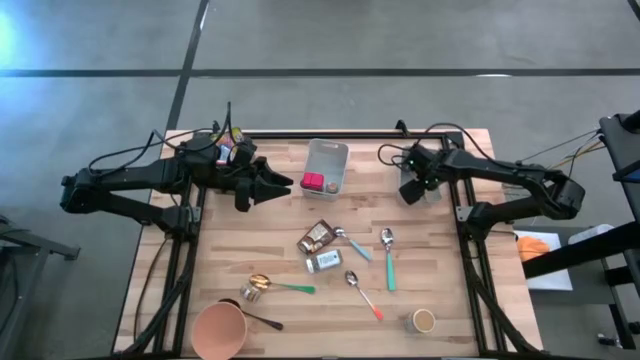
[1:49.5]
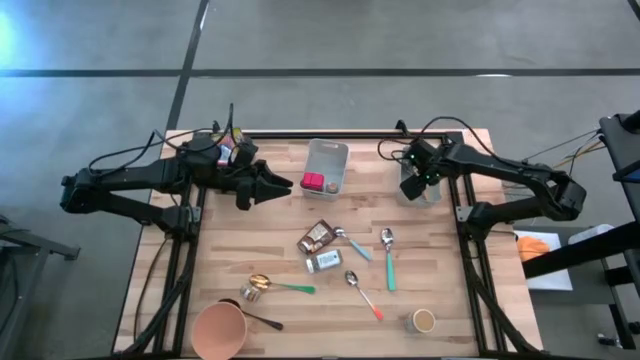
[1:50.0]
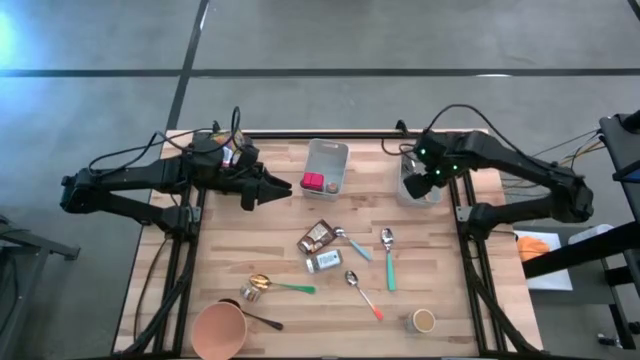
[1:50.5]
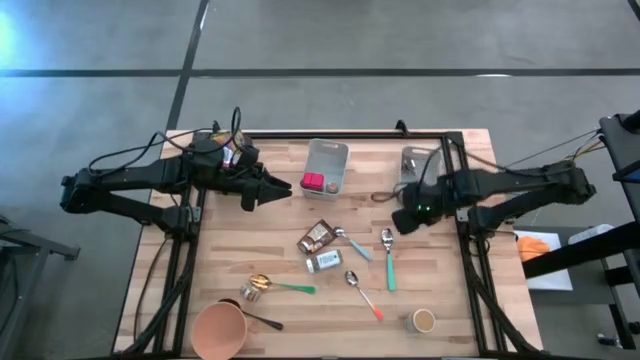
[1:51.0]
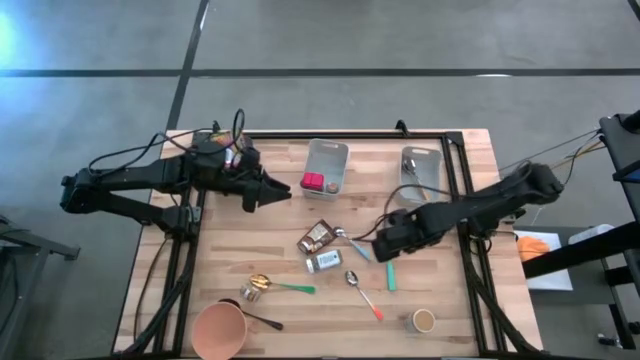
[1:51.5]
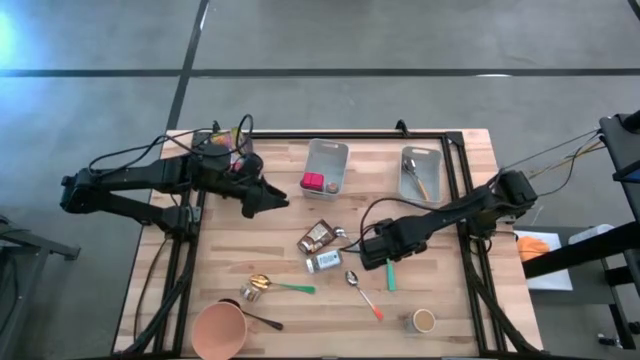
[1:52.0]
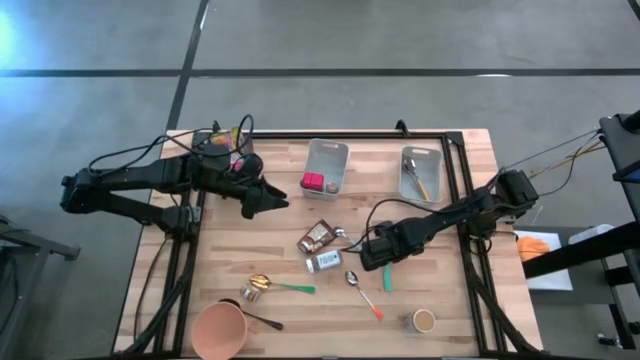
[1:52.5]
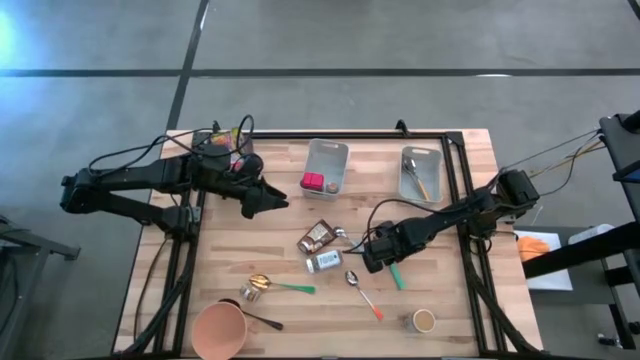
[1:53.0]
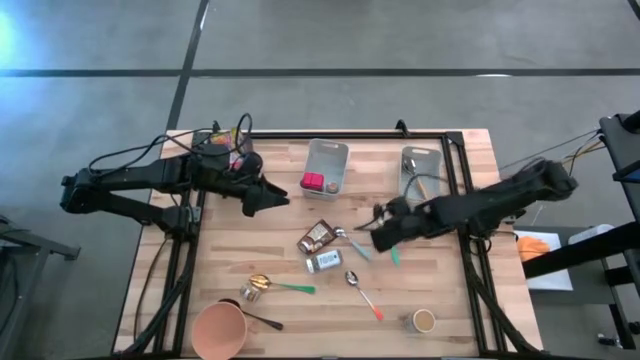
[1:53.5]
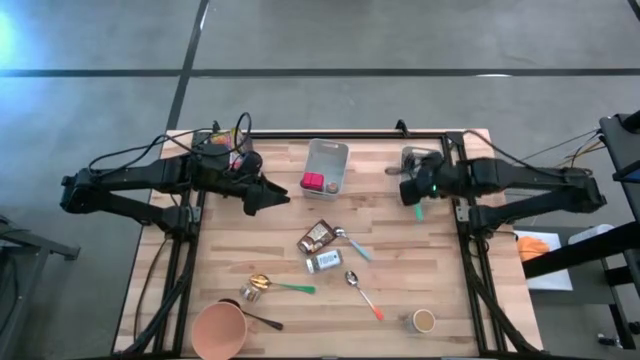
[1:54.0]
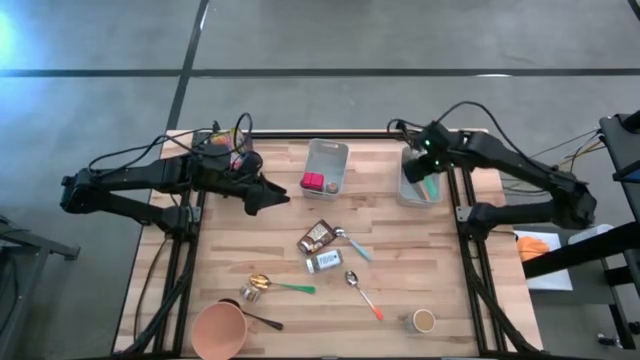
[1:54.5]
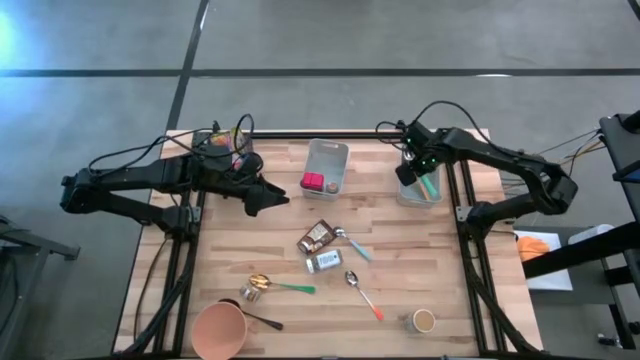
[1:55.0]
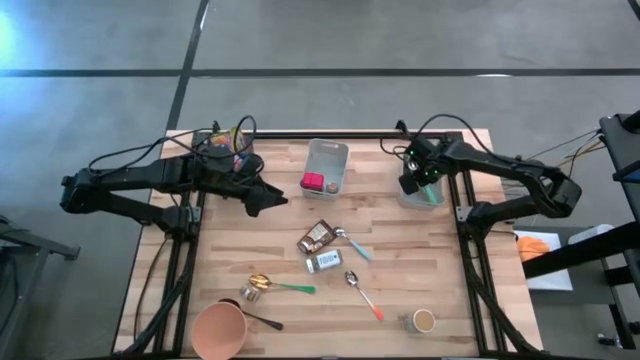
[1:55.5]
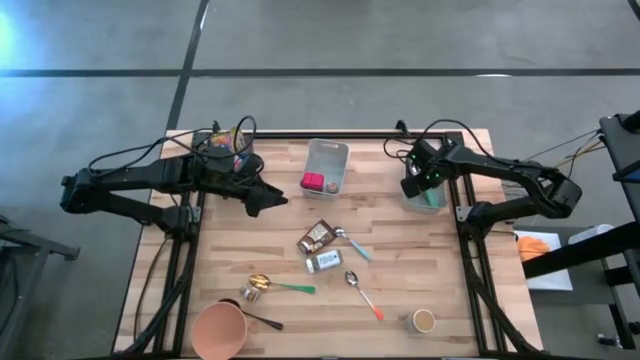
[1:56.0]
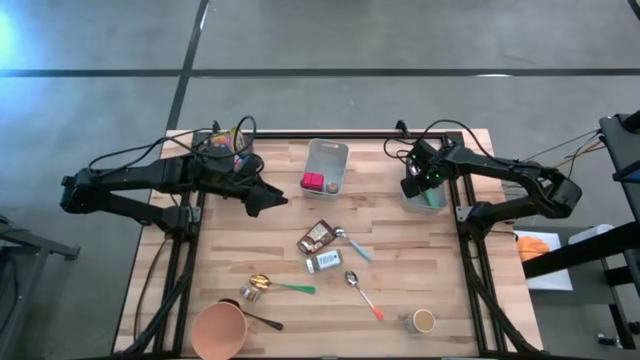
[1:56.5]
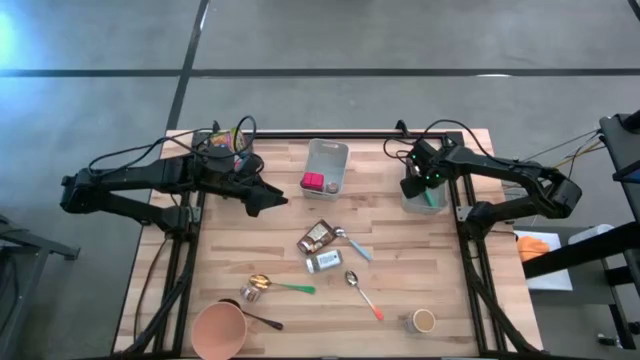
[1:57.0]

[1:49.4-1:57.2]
Put the light green spoon into the right gray bin

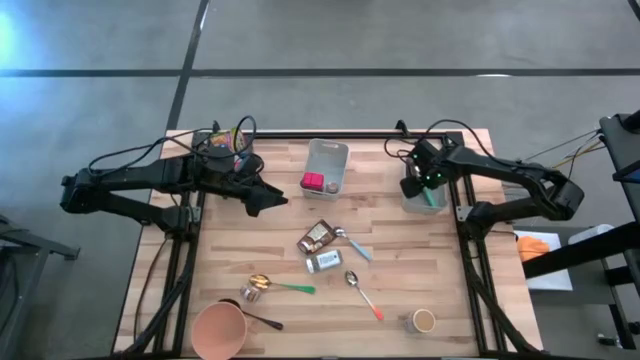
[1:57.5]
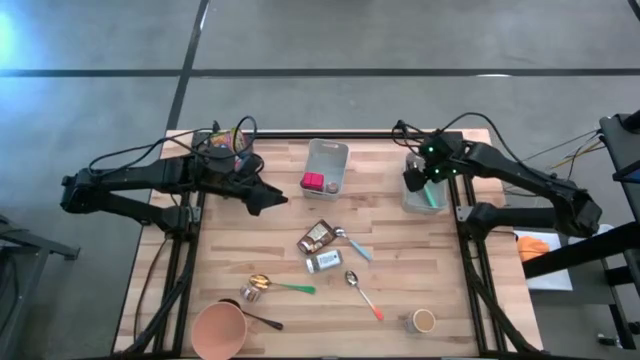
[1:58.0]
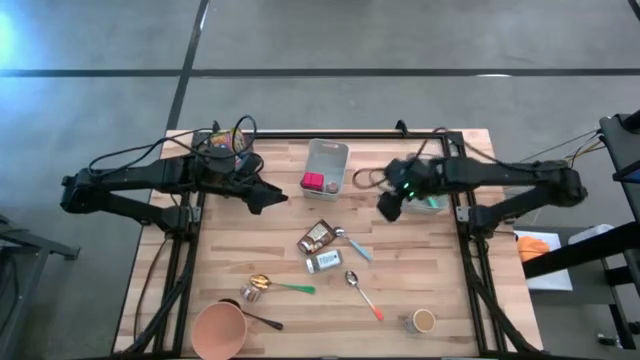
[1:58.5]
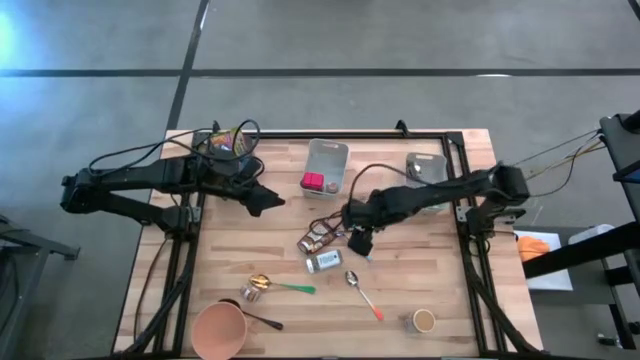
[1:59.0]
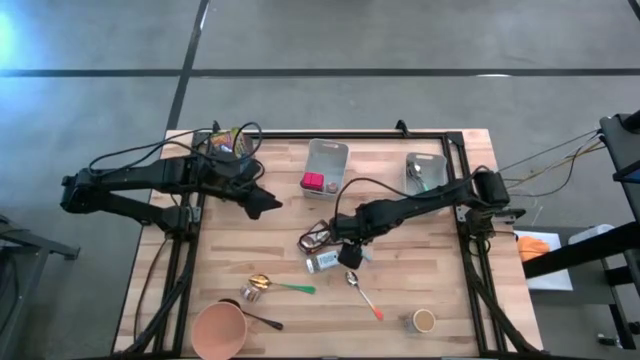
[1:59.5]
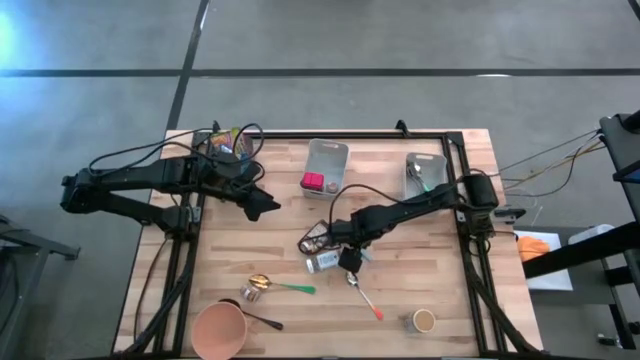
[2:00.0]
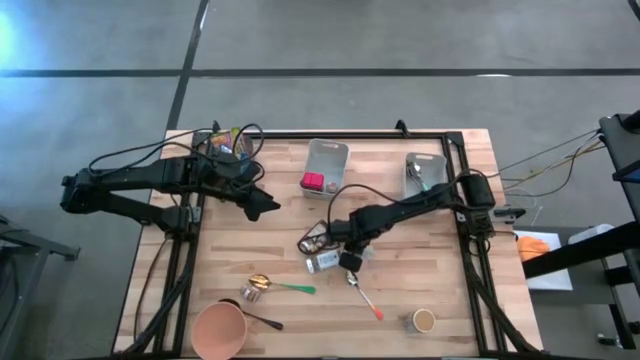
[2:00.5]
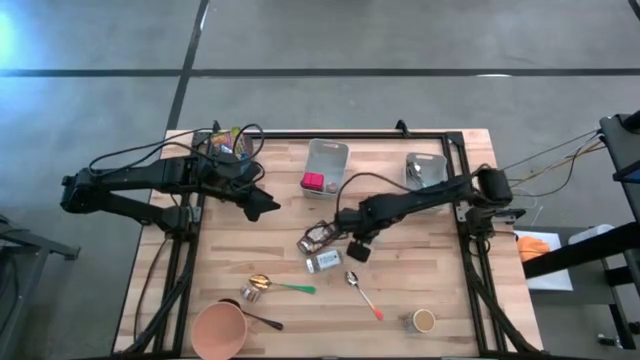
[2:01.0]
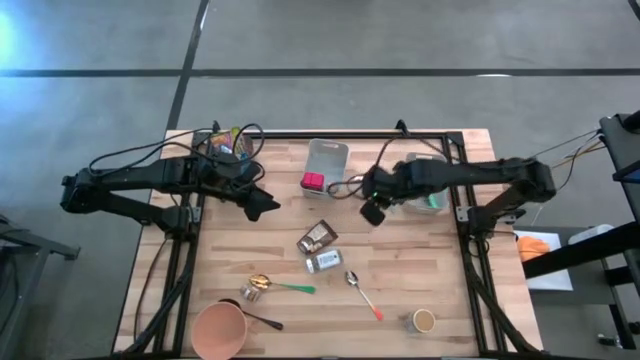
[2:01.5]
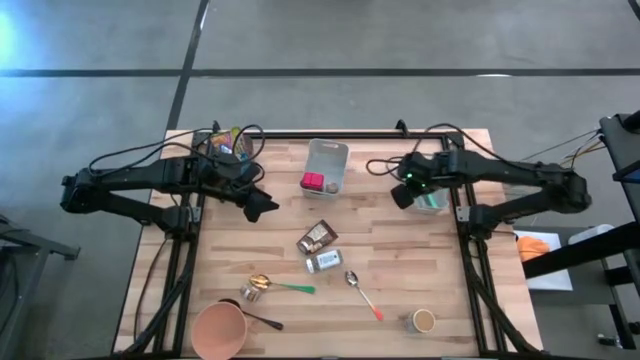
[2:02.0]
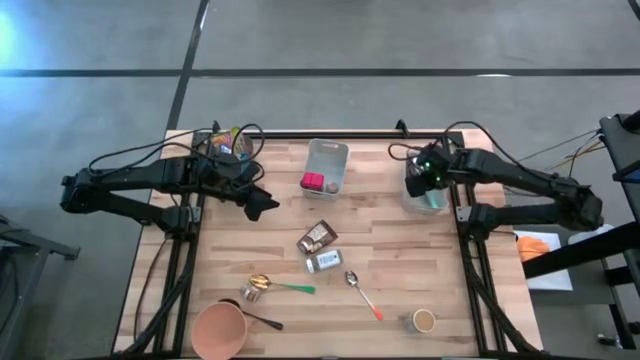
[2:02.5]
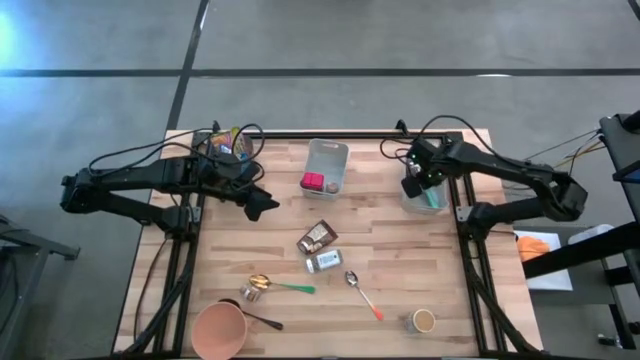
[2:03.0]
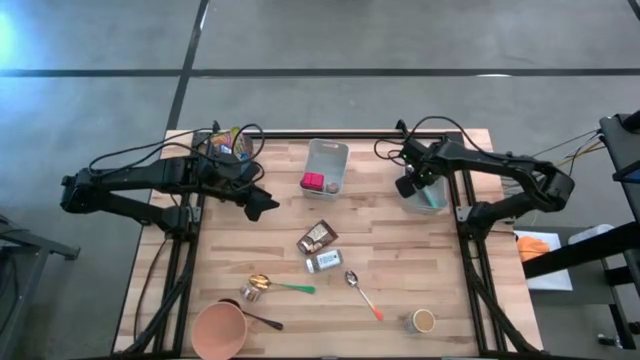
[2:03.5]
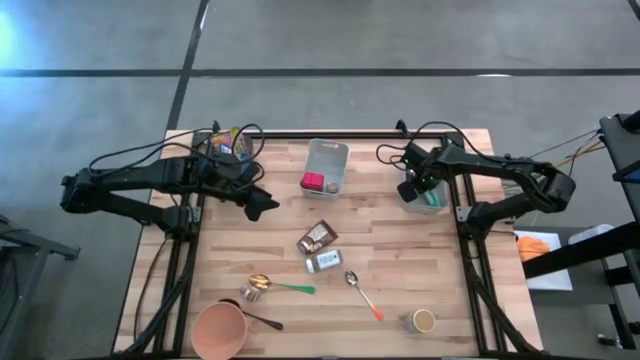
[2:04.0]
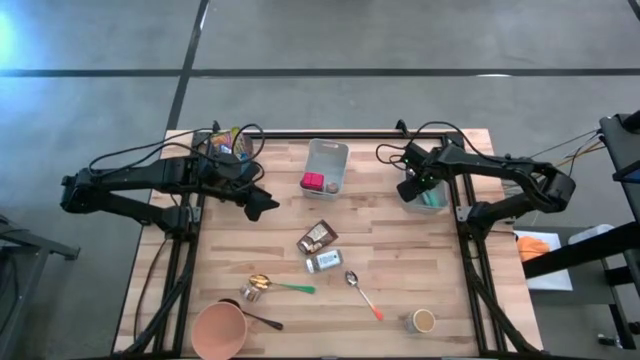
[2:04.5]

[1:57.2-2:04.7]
Put the light blue spoon into the right gray bin

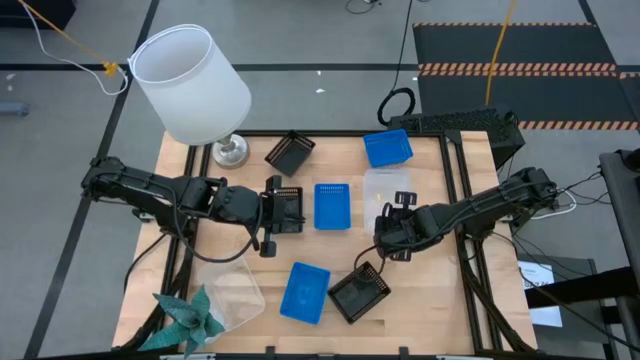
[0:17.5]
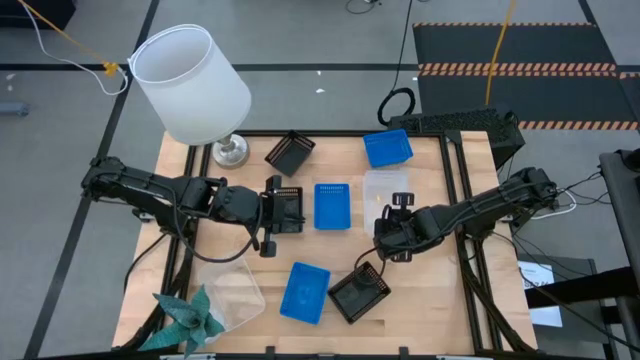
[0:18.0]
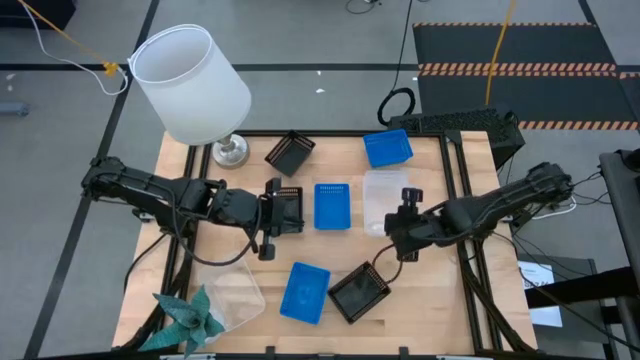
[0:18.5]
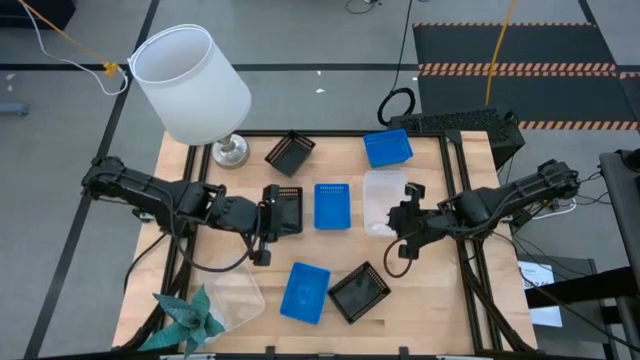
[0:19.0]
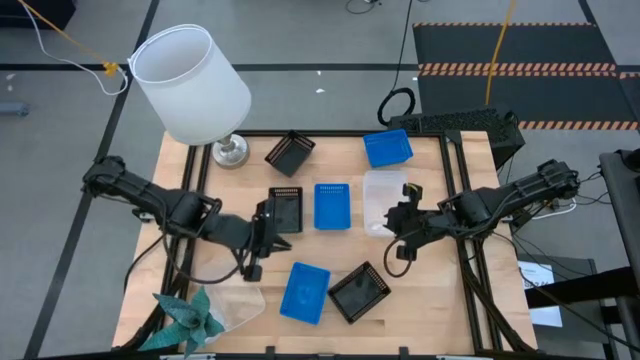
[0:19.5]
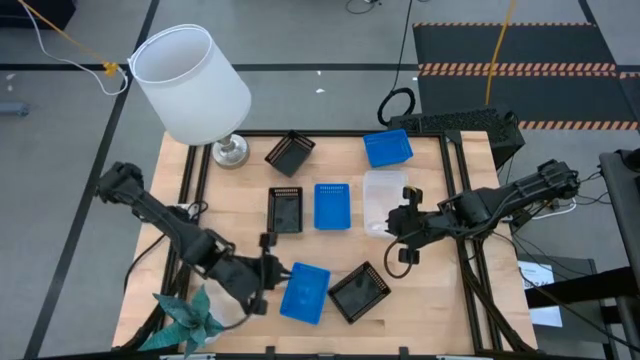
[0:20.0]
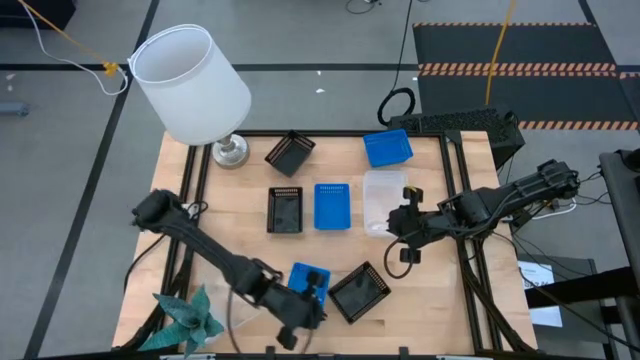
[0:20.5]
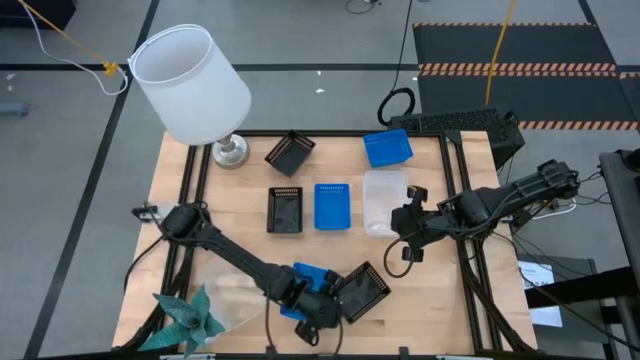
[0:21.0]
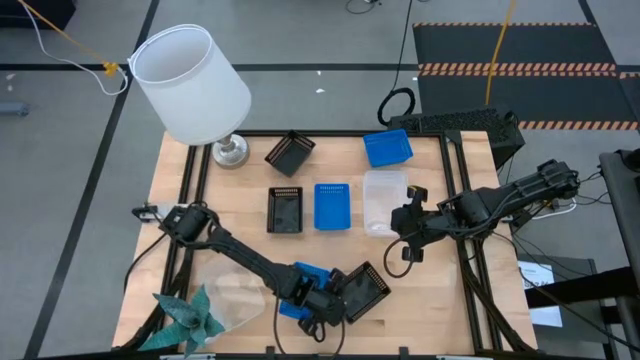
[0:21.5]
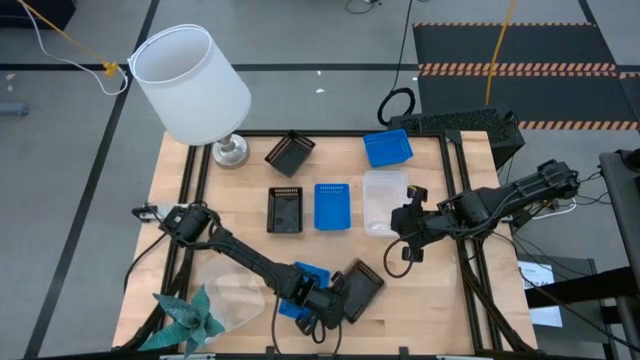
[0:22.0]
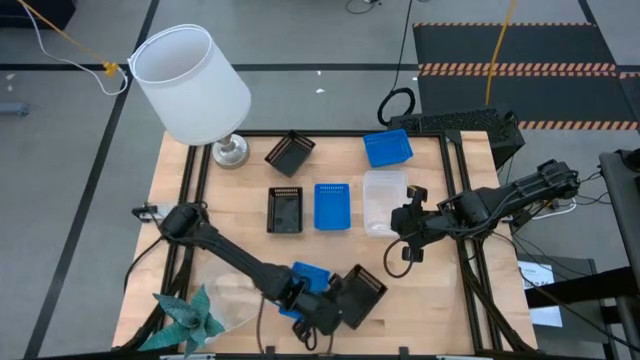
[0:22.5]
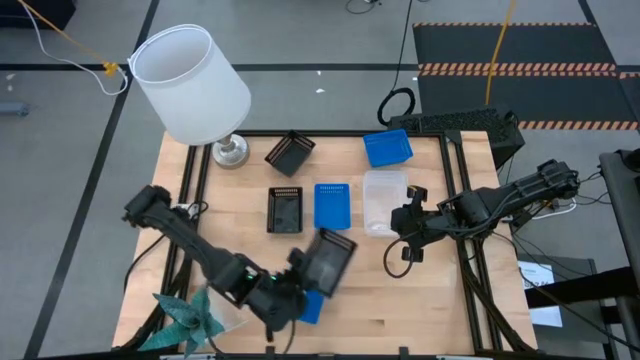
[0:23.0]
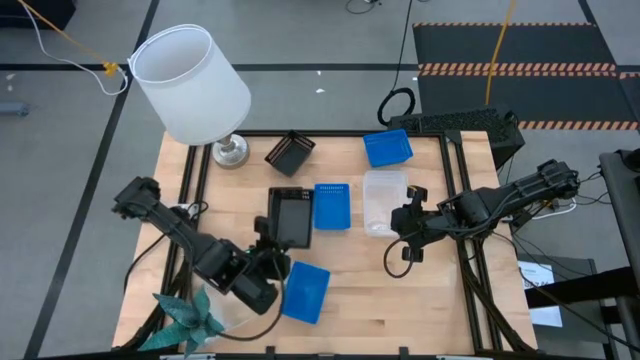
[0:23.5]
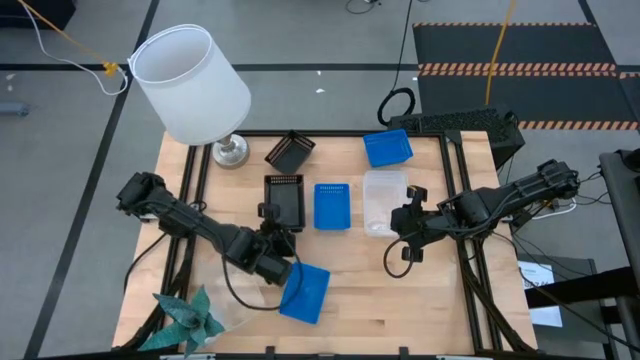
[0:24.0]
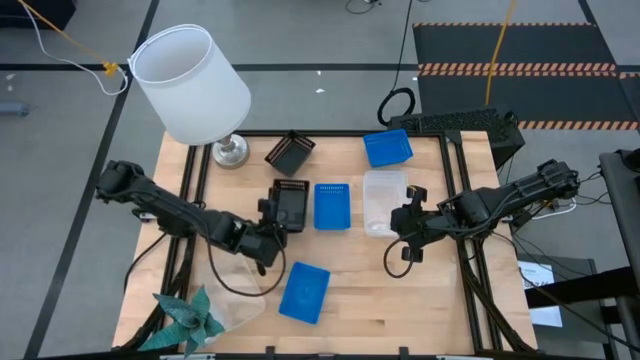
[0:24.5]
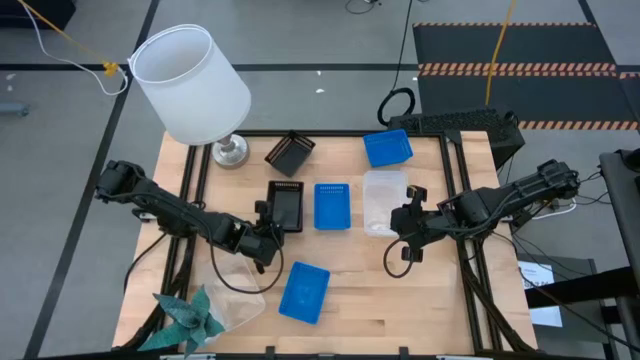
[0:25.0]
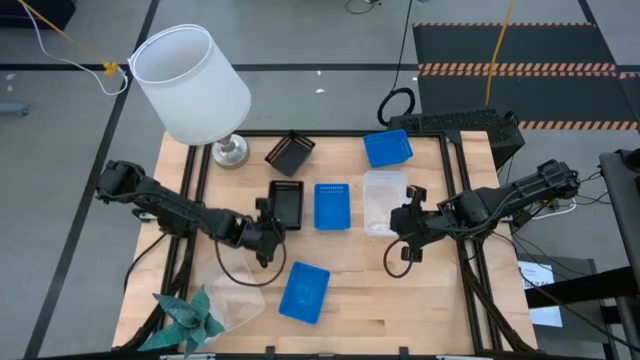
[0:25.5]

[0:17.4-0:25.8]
Stack the bottom black bin on top of the middle left black bin
